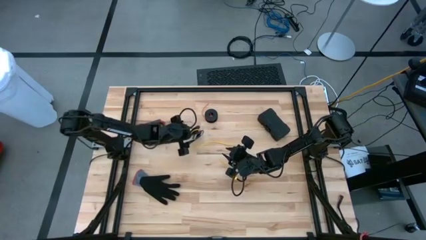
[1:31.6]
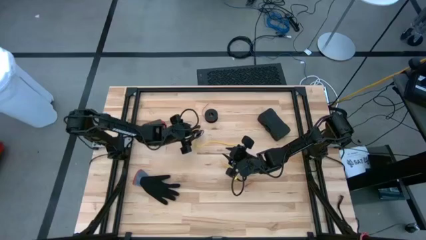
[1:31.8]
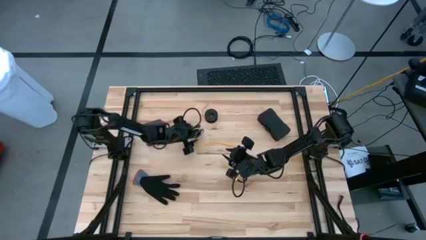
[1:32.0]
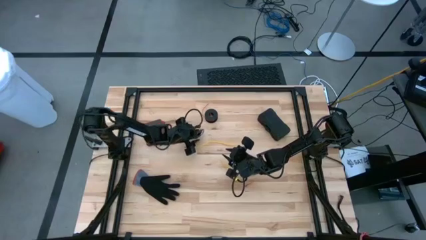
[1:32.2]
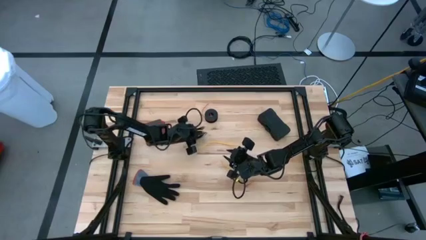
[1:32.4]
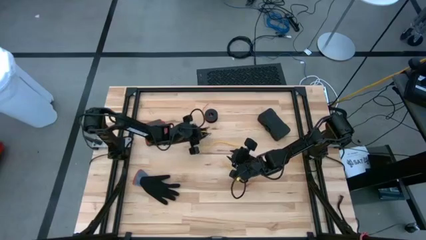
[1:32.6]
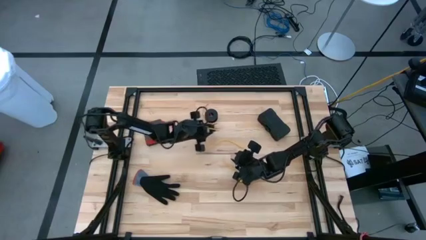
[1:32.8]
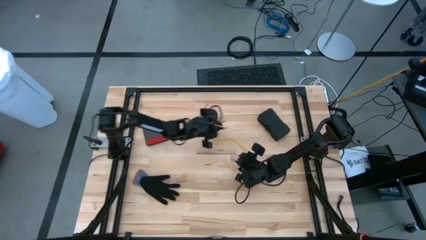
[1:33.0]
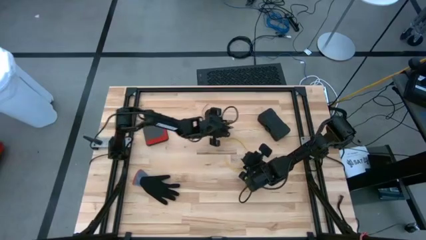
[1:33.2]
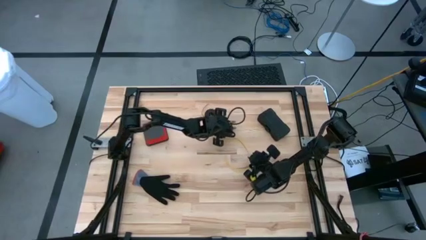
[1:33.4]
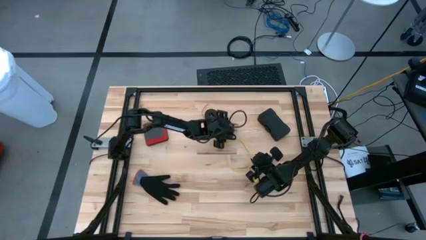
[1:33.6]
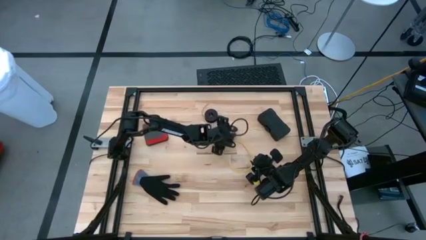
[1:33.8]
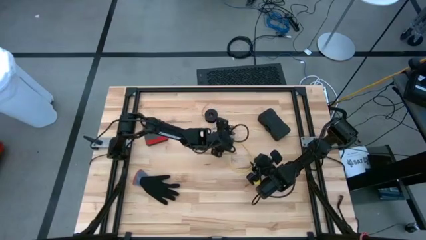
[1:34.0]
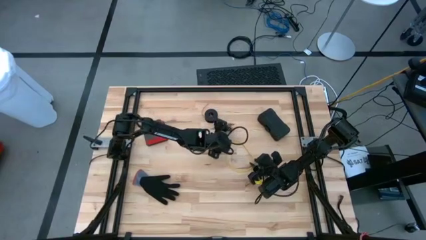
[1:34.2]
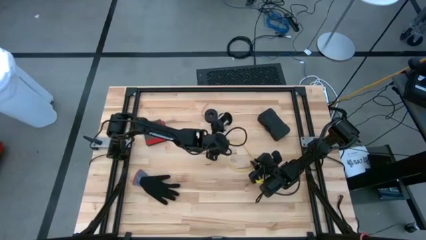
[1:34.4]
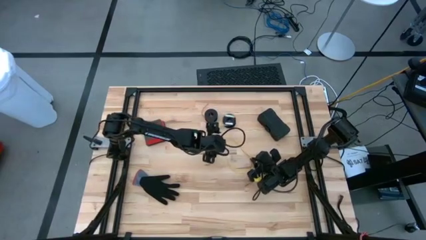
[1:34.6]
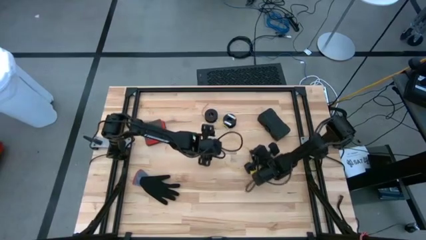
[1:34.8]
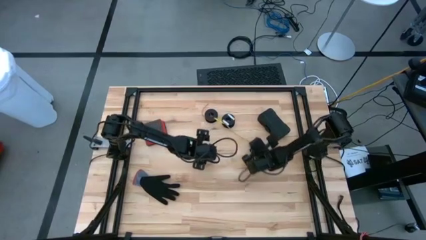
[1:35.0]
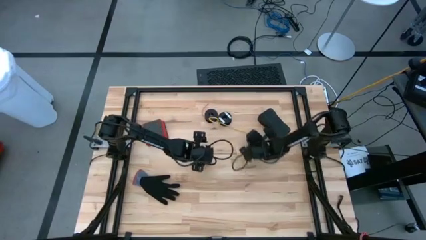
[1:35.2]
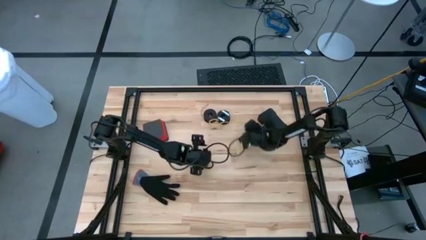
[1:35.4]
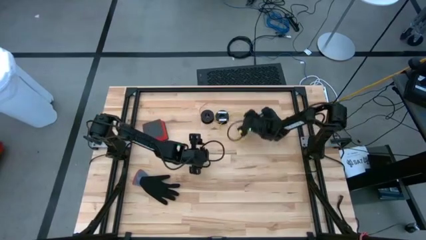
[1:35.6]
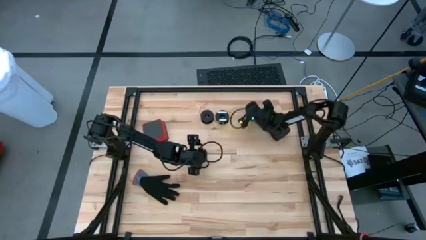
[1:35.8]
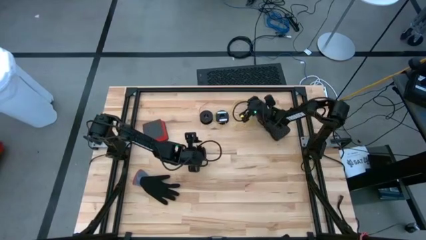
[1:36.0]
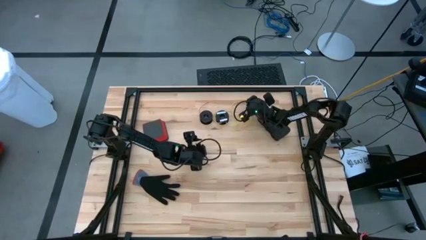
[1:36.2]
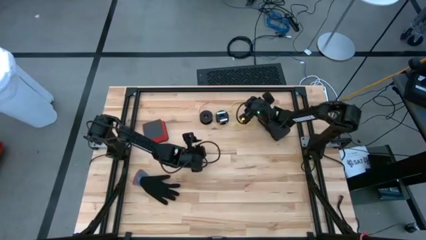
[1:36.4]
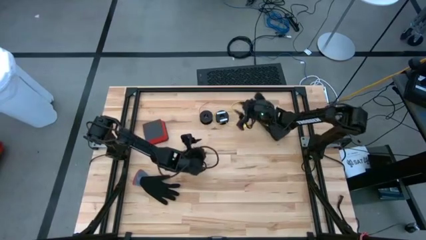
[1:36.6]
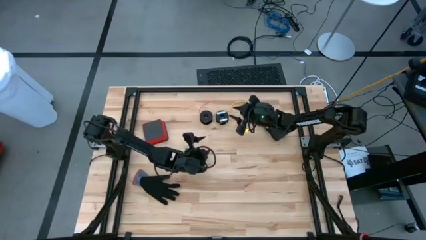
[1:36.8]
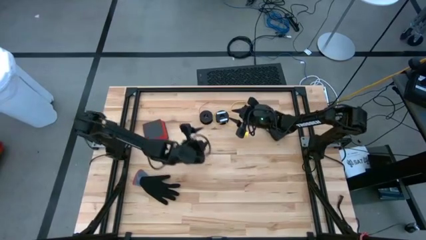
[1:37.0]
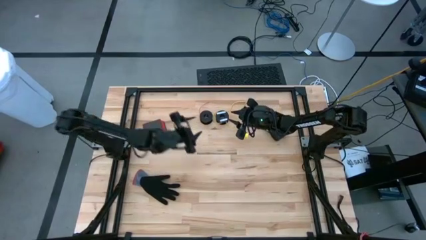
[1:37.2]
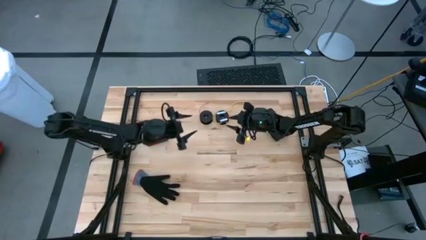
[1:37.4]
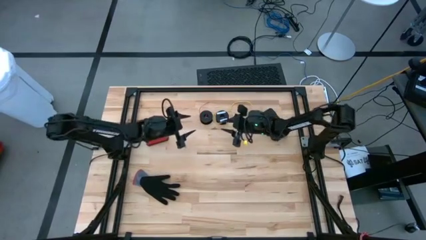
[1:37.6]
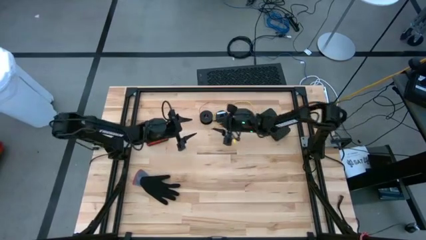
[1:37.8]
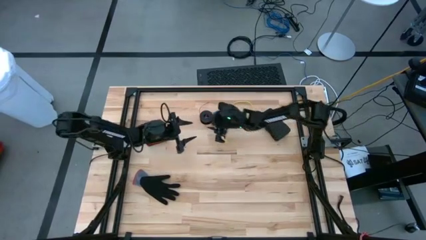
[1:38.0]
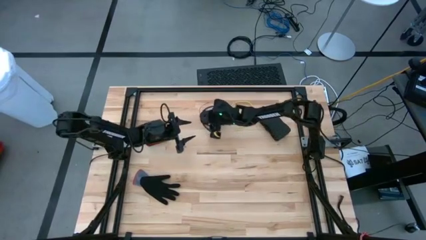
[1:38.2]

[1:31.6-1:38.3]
Task: Coil cords
Move the spool and yellow wire to the right

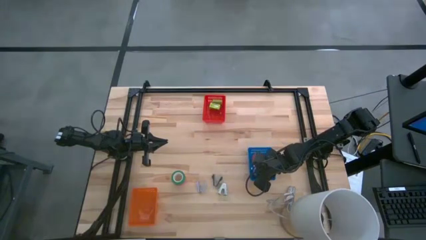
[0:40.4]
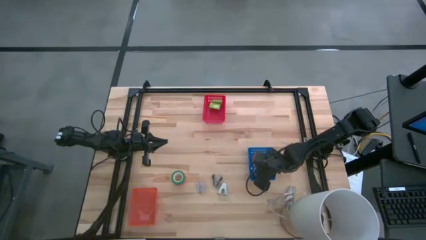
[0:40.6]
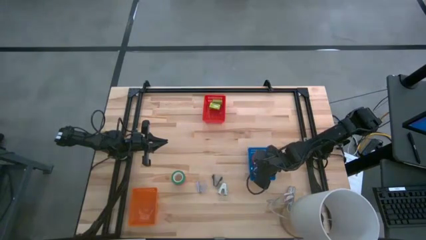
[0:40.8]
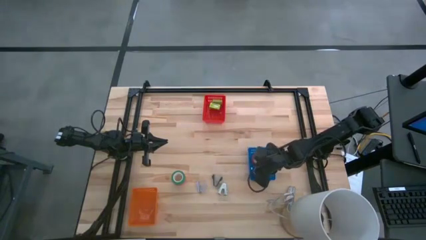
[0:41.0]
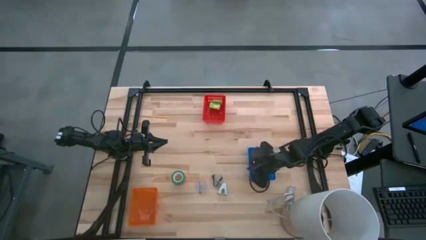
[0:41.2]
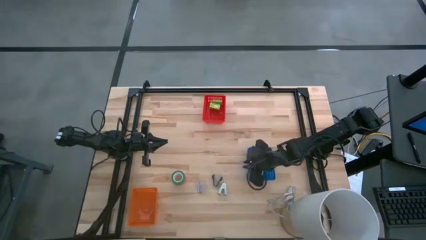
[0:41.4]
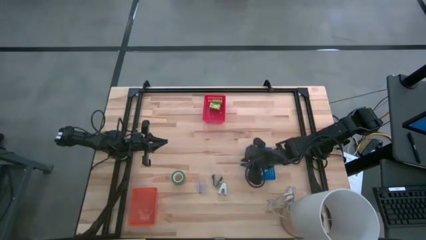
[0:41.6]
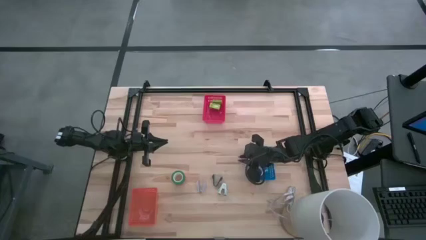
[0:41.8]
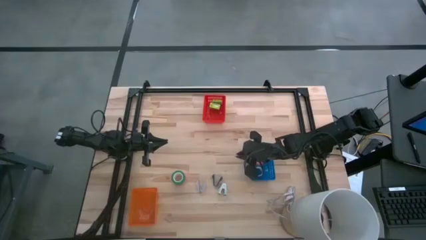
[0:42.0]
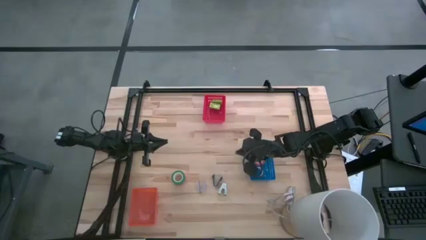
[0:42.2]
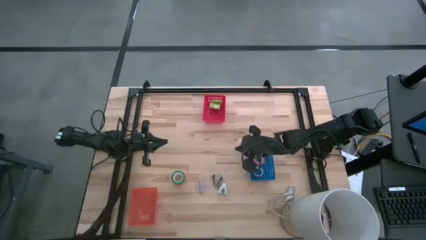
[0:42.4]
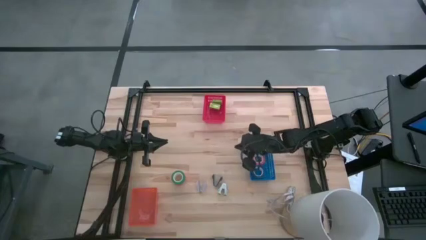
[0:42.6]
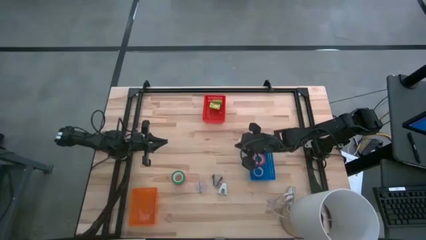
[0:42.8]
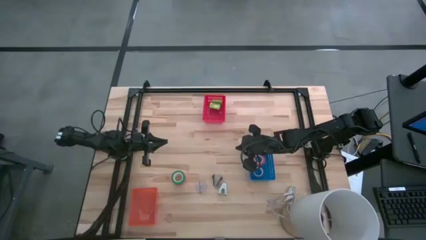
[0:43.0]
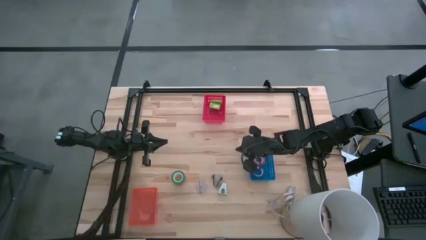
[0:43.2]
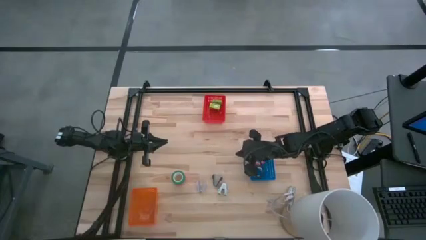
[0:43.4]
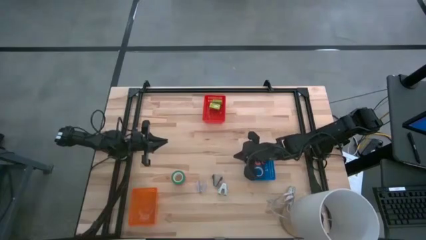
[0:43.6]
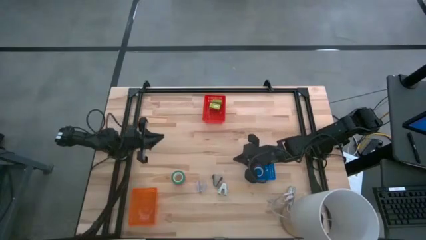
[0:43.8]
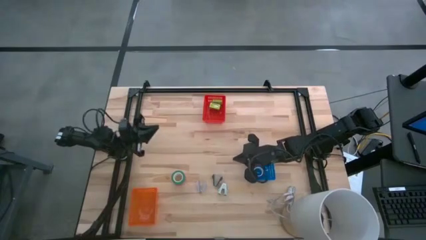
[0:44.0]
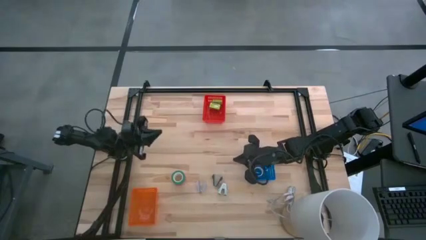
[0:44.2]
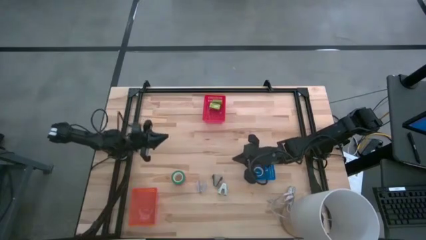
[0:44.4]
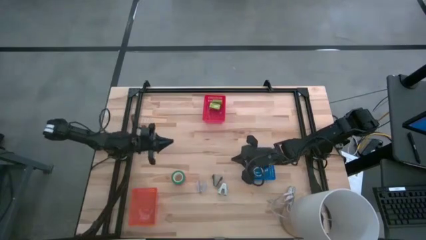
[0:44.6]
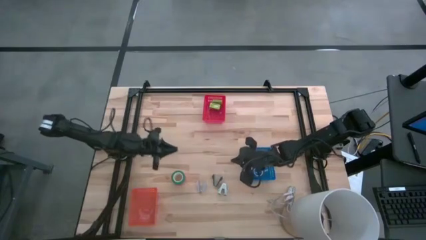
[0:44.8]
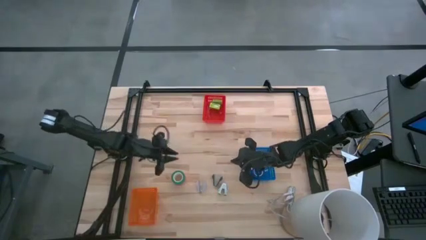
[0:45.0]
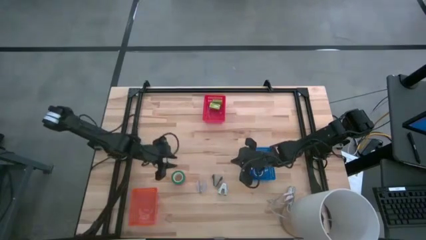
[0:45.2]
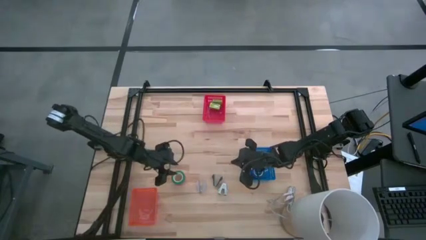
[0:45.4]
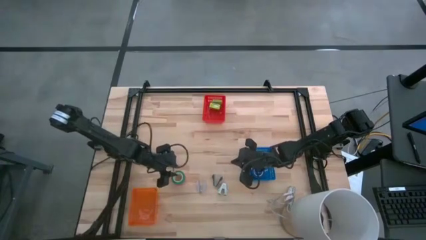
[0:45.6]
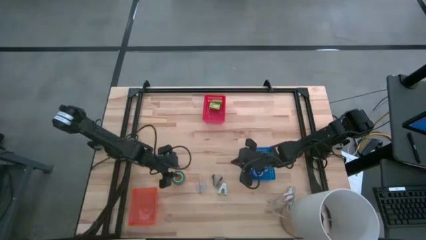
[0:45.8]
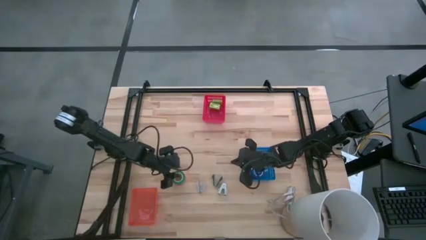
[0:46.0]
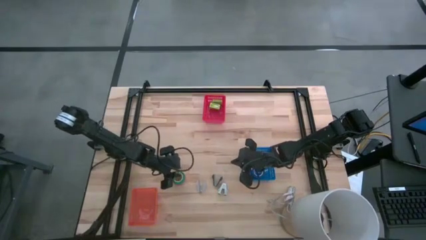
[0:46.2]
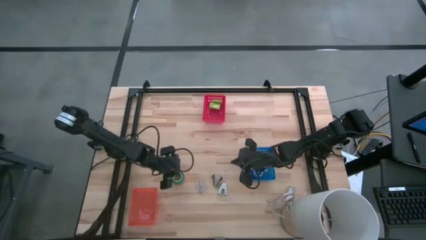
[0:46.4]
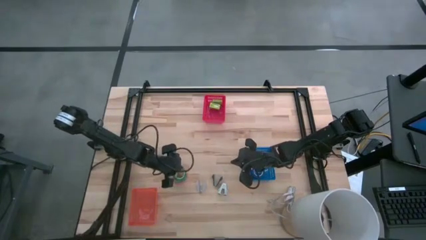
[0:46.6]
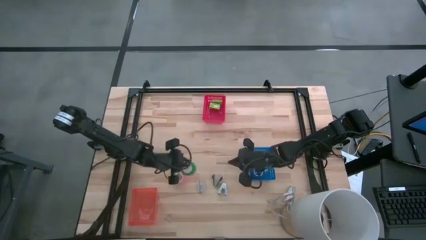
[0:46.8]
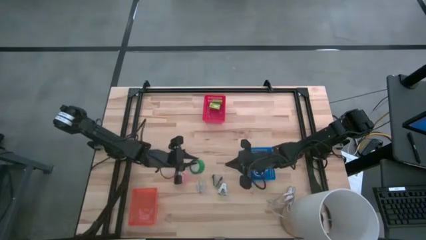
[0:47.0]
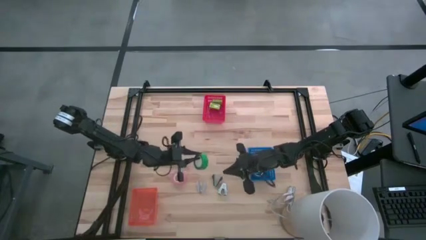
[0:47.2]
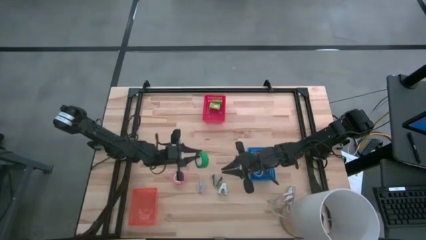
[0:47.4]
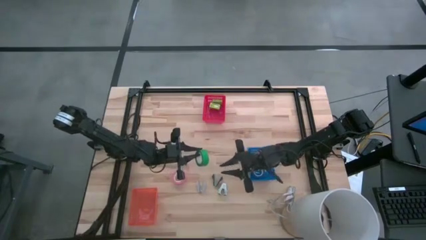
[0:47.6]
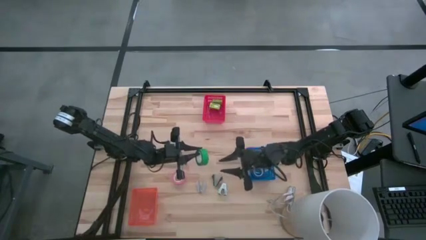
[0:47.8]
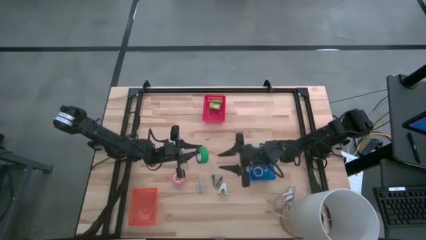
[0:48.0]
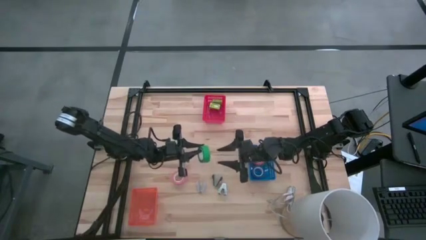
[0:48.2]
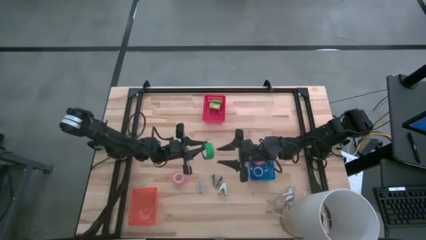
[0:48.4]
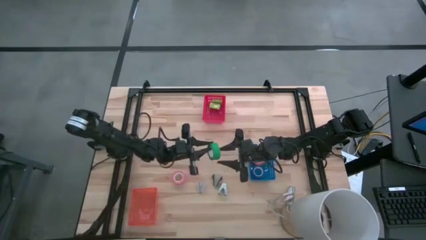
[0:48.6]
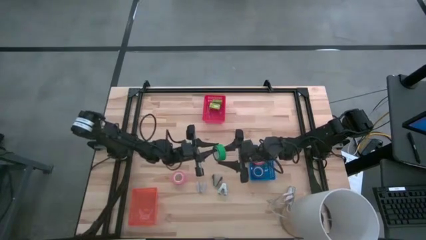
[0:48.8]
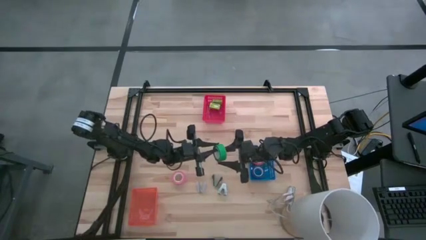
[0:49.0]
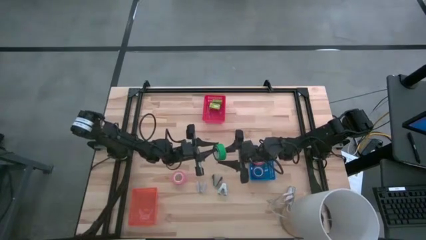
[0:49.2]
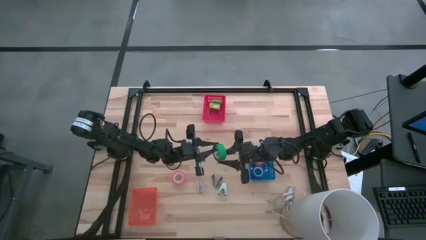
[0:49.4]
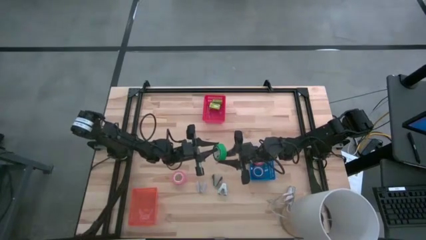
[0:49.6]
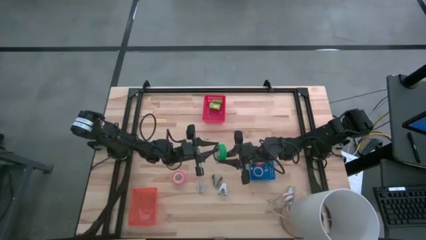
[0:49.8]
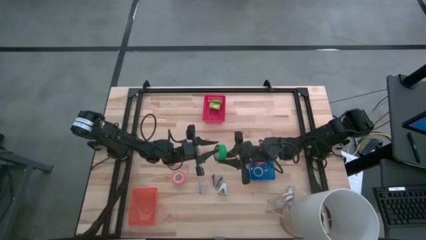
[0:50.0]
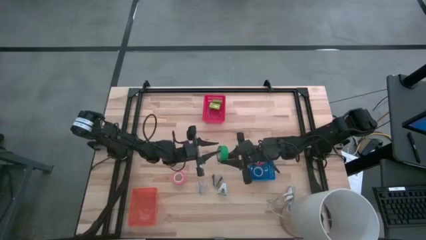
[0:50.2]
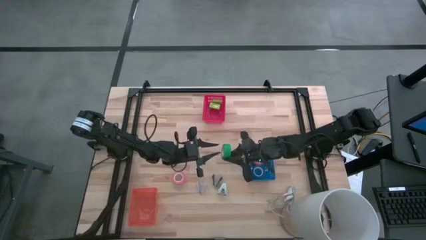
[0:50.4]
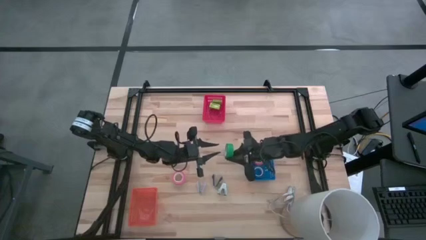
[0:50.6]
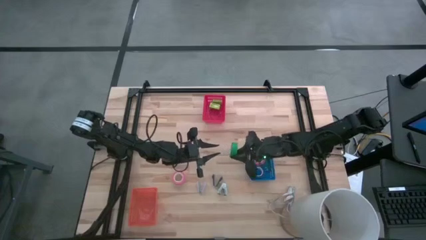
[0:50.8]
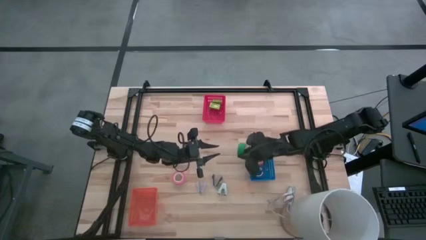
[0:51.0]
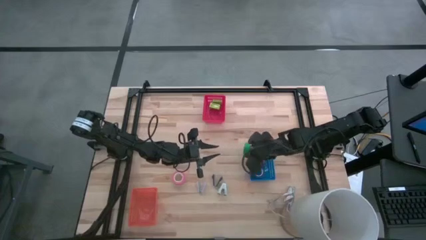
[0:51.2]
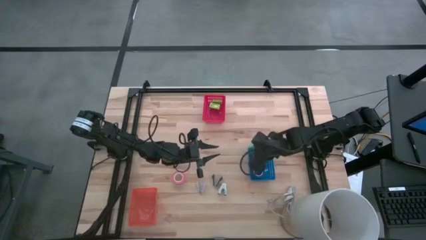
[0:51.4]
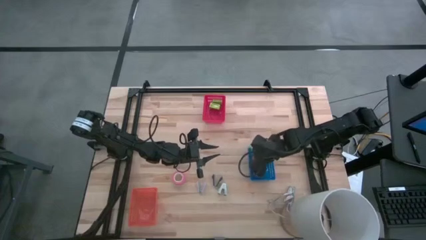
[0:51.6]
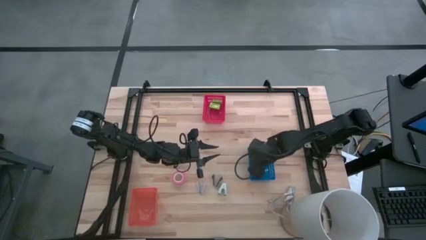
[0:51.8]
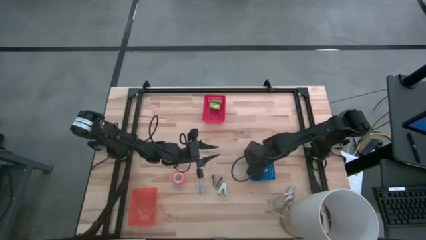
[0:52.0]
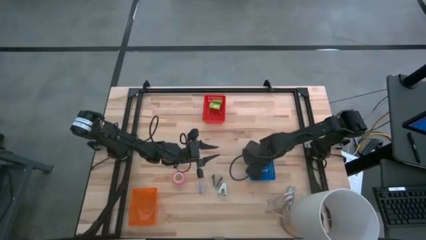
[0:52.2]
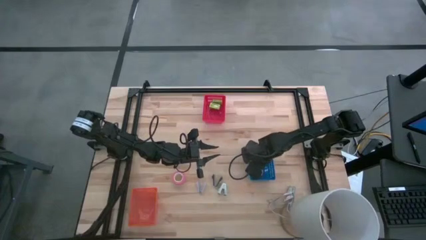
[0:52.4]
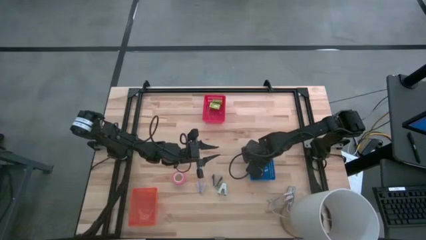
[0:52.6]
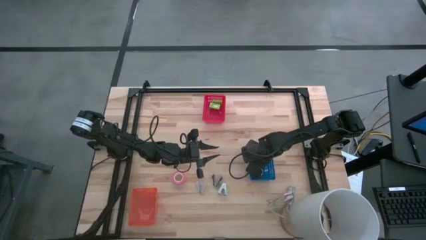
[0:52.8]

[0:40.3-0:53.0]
Task: Pick and place Stapler, Stapler remover, tape
Put the green tape into the blue bin
